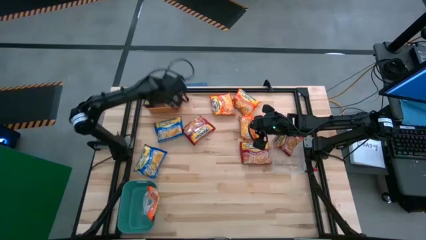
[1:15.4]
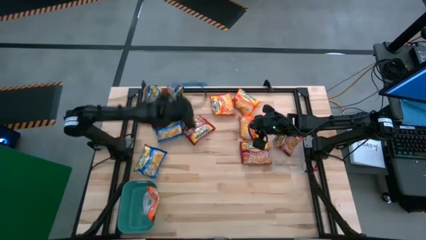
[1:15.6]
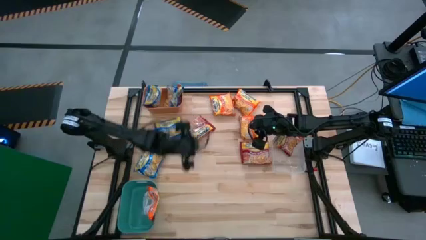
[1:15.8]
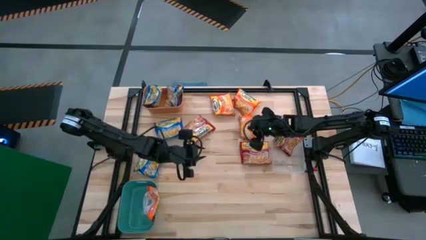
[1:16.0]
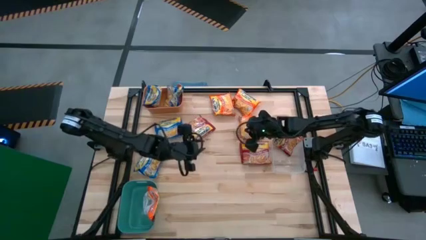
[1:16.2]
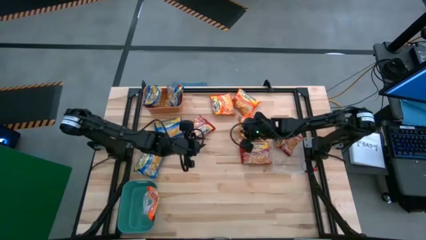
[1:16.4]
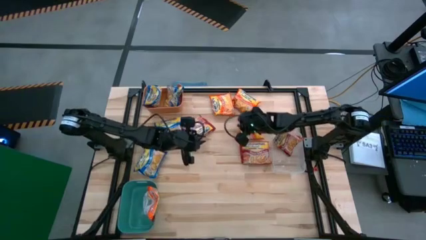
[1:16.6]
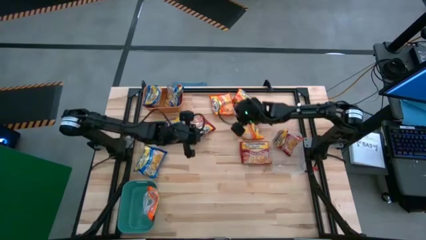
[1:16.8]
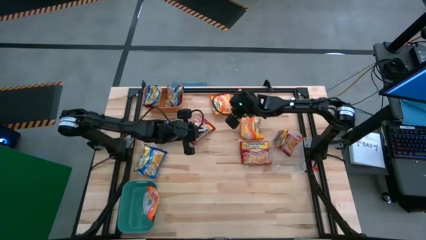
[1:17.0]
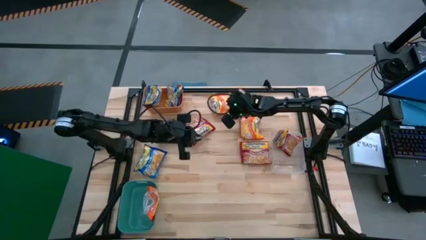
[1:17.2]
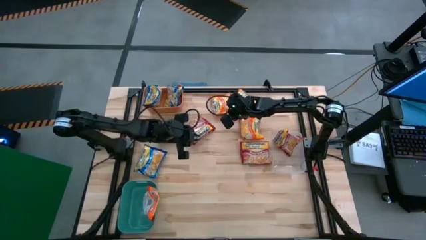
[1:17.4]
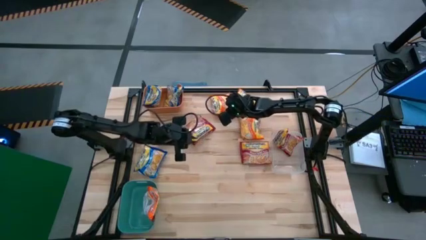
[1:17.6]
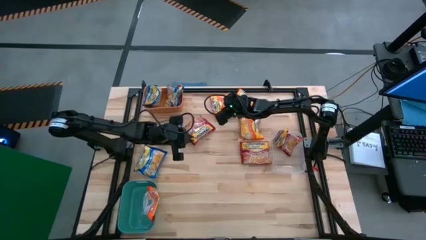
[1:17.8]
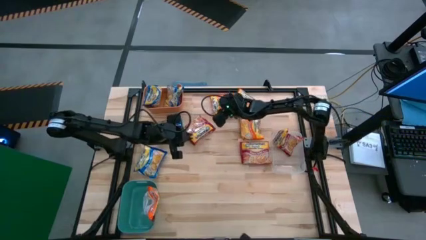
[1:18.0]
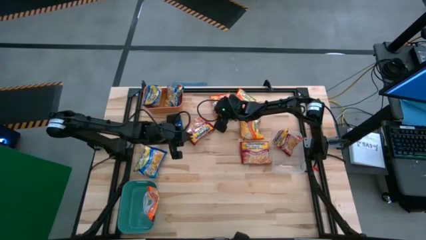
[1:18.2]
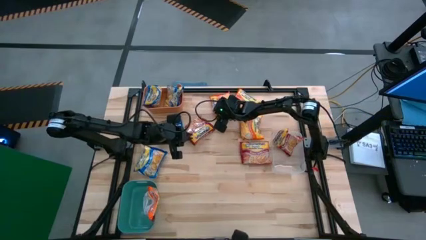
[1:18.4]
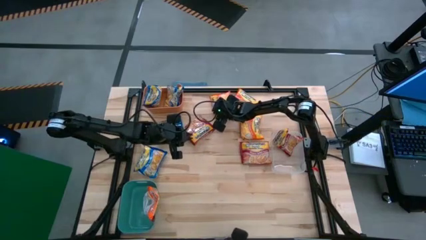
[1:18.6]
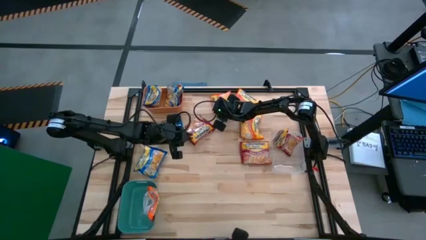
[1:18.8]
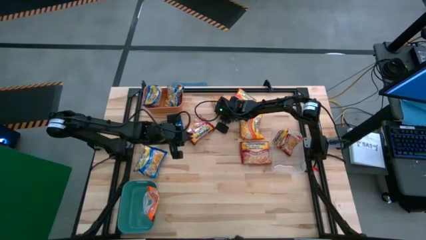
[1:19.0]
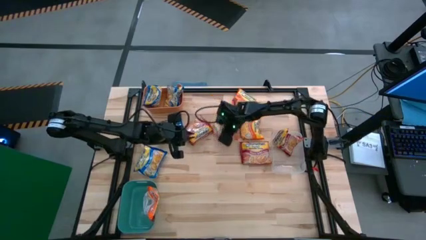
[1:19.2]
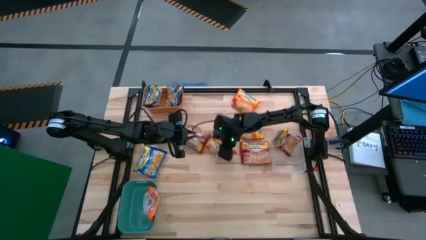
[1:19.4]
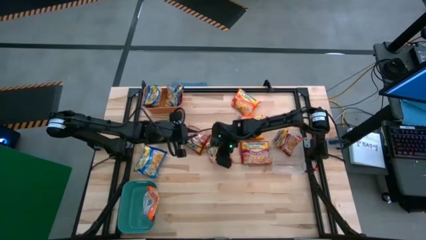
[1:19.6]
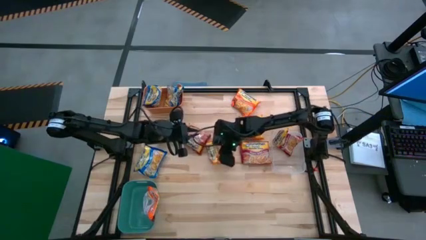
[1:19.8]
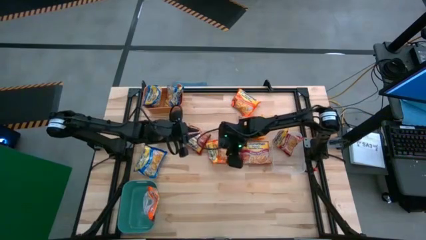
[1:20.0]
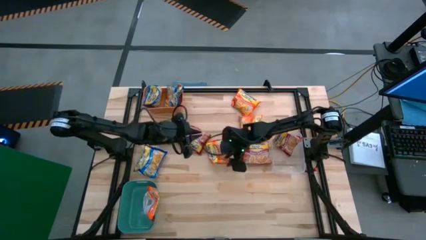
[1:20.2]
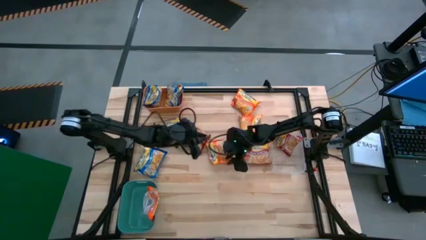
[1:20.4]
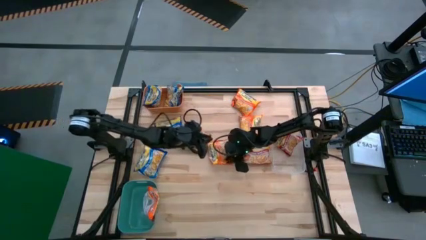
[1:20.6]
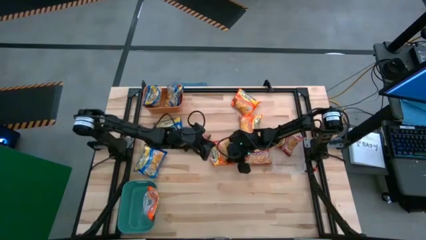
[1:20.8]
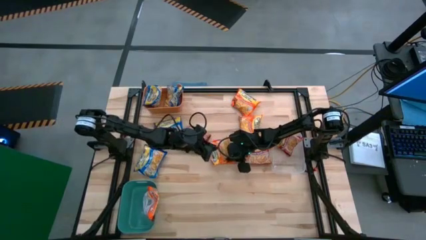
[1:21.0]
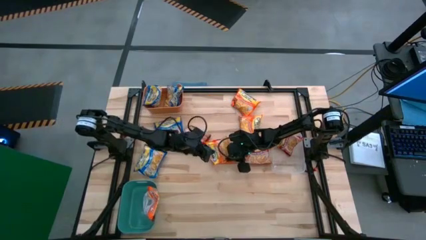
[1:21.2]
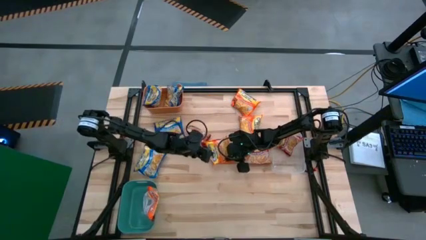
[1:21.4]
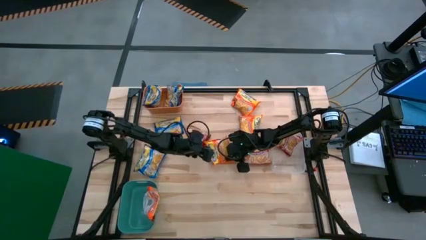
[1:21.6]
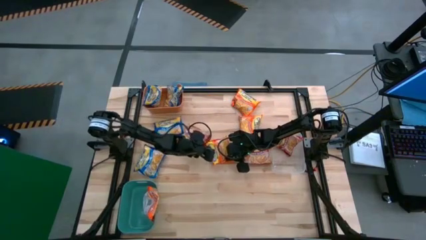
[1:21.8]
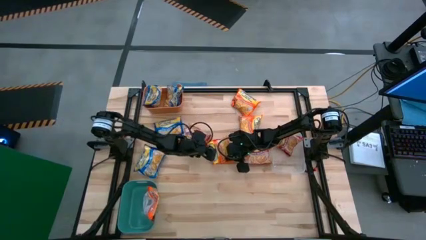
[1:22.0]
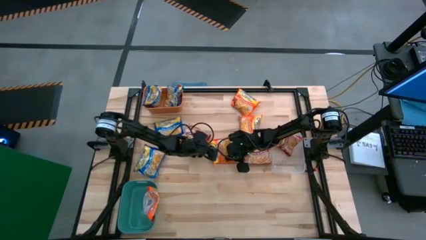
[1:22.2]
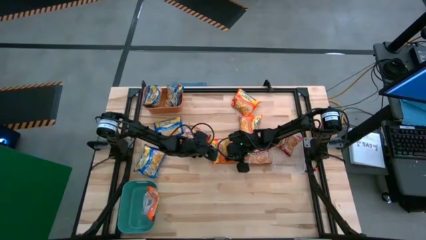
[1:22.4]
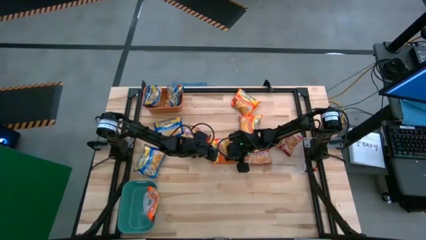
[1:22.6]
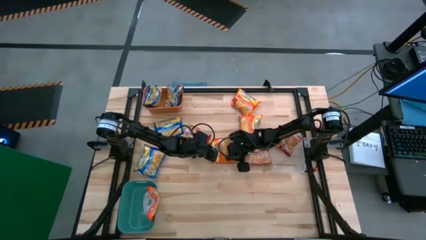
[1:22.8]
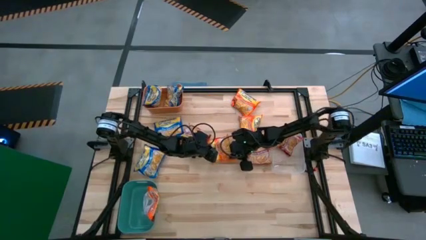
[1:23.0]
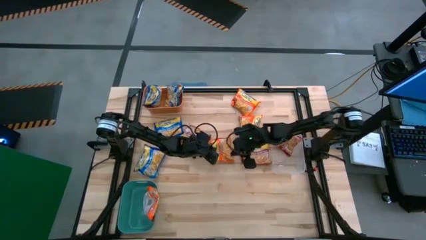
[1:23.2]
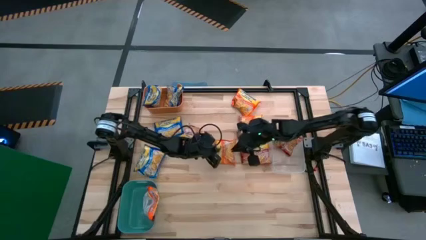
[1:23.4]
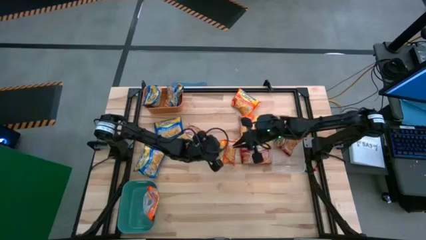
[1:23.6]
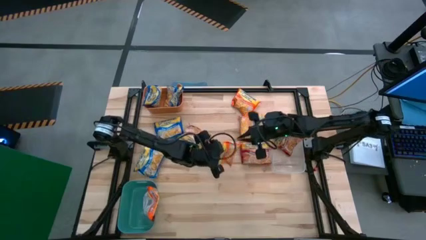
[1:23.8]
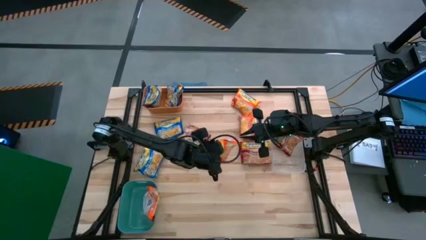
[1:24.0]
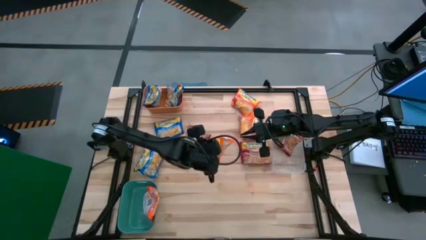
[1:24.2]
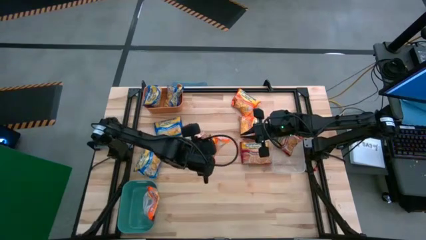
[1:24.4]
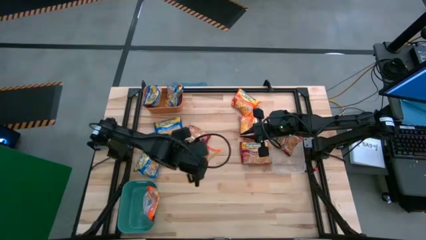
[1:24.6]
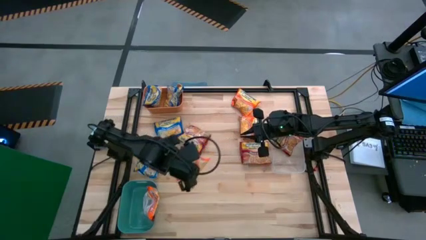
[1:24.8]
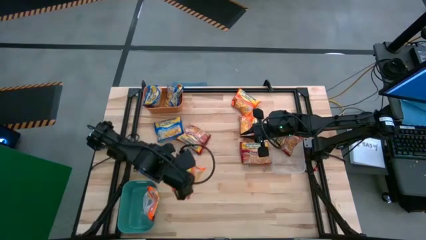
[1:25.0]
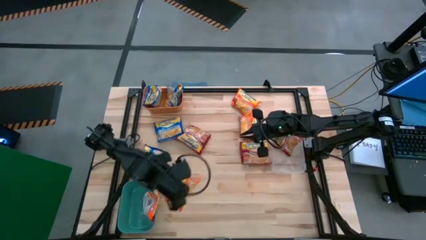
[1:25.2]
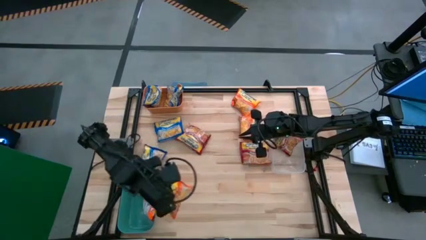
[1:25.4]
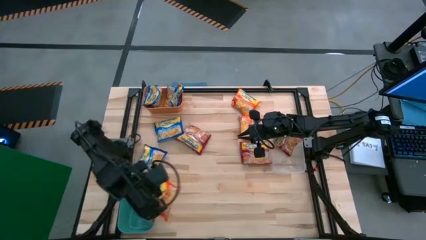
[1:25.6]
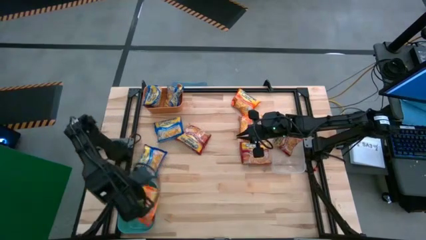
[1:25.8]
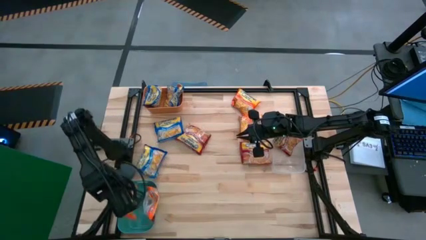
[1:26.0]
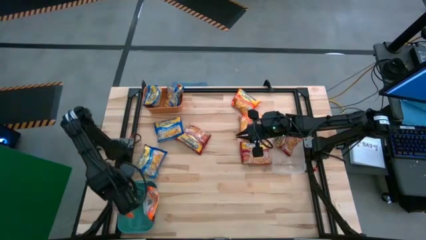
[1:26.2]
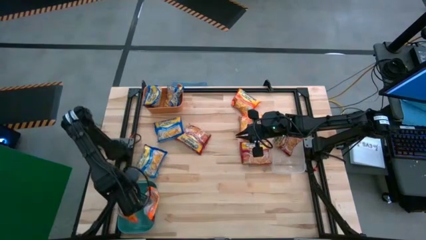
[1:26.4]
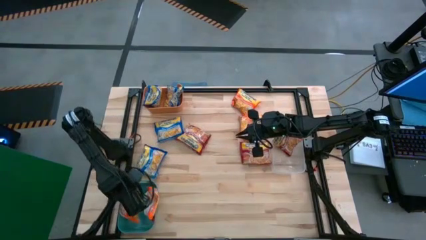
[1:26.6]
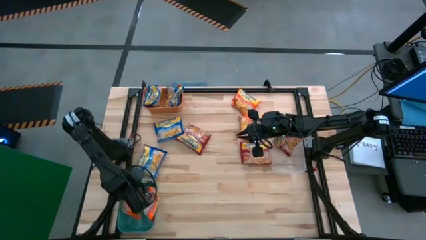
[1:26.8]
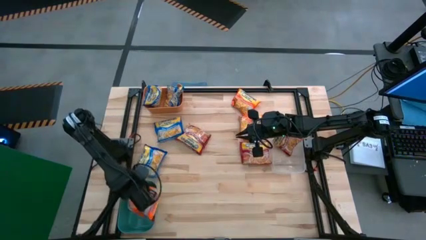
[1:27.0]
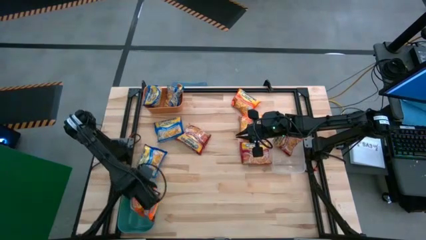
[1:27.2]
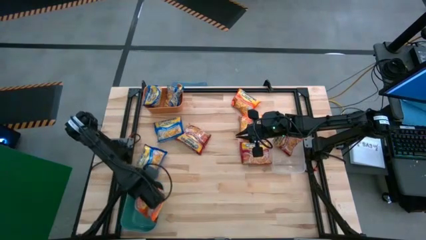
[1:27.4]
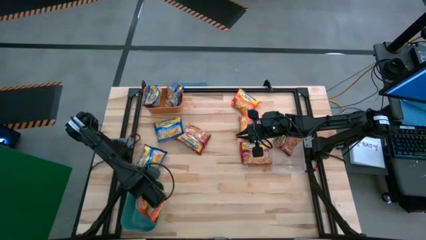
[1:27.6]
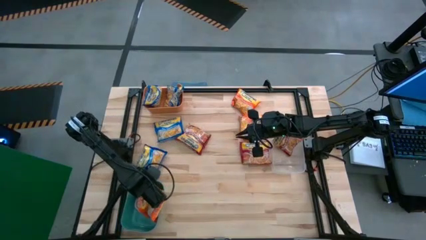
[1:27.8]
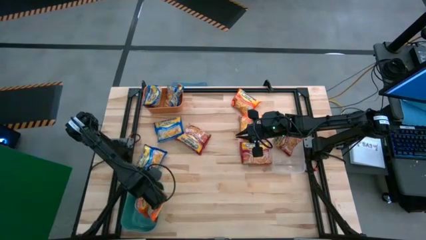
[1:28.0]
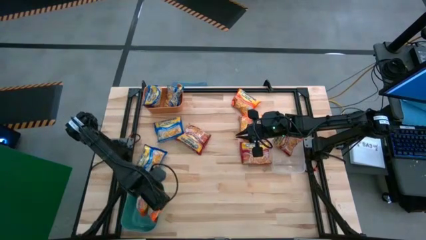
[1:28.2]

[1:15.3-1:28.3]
Task: Sort Maruchan noodles
Put the orange noodle pack into the green bin

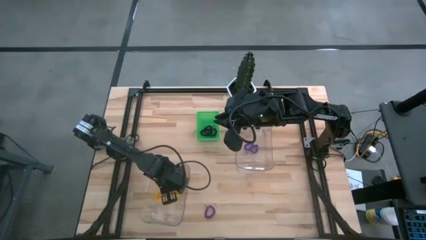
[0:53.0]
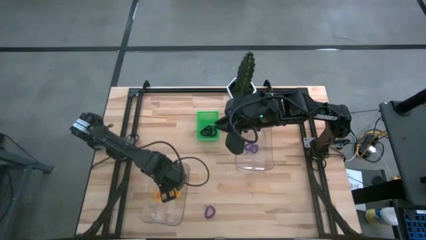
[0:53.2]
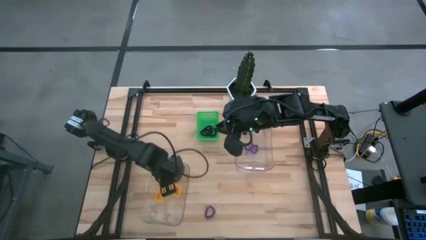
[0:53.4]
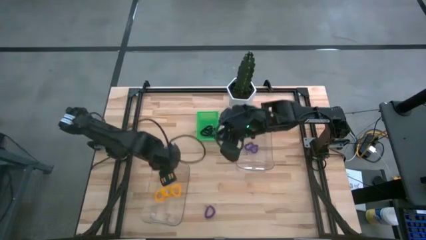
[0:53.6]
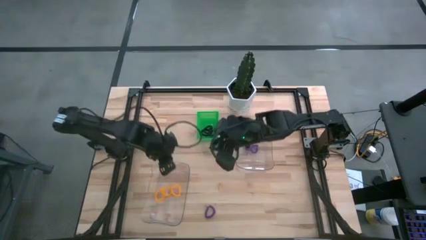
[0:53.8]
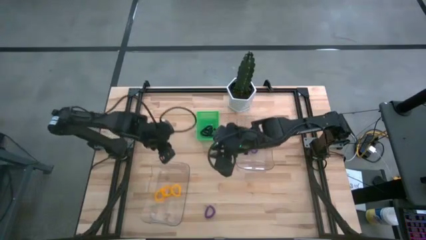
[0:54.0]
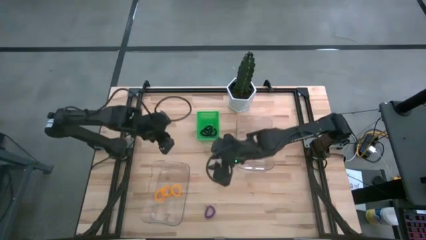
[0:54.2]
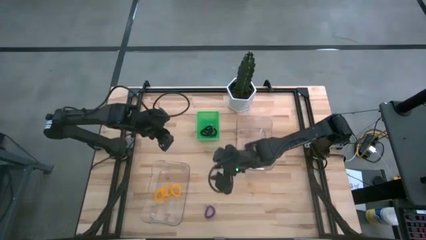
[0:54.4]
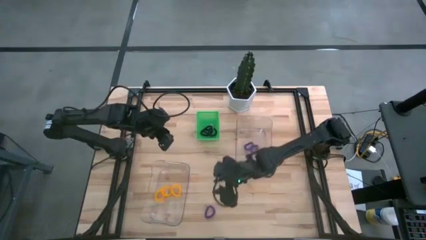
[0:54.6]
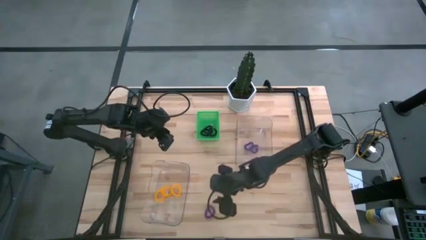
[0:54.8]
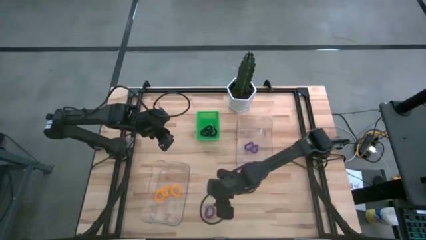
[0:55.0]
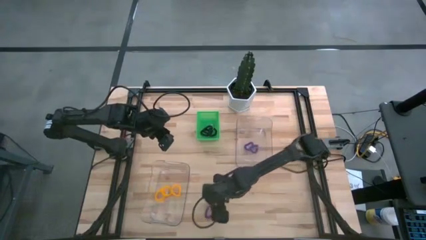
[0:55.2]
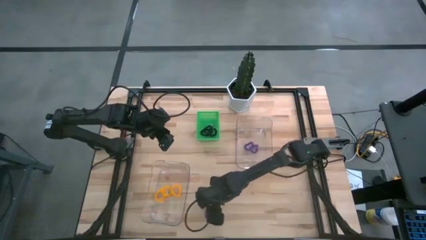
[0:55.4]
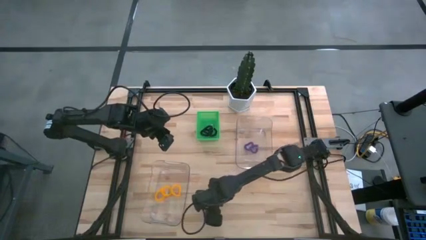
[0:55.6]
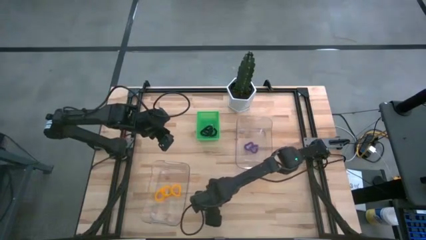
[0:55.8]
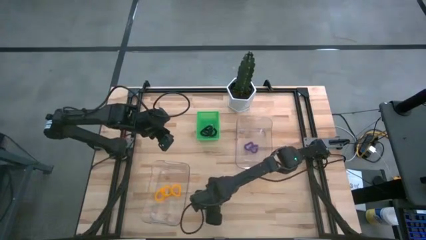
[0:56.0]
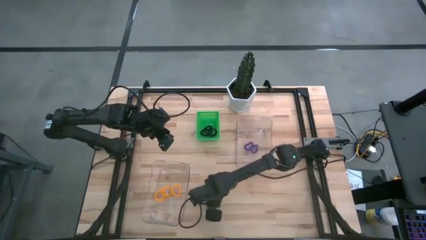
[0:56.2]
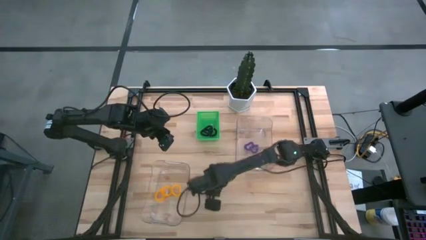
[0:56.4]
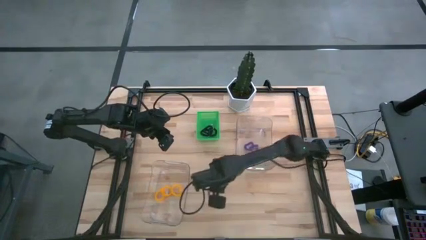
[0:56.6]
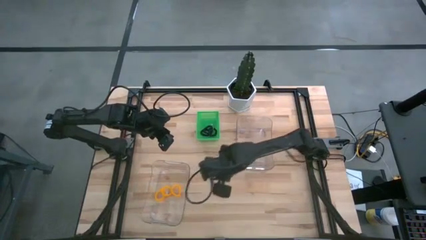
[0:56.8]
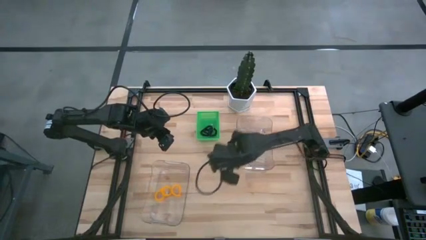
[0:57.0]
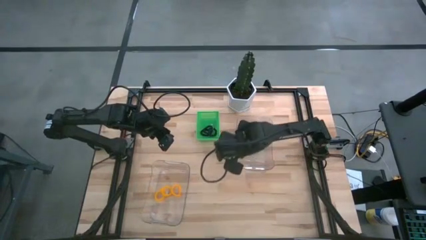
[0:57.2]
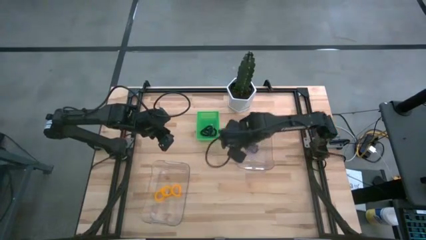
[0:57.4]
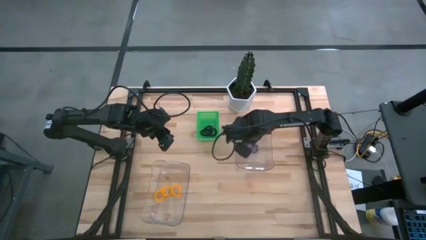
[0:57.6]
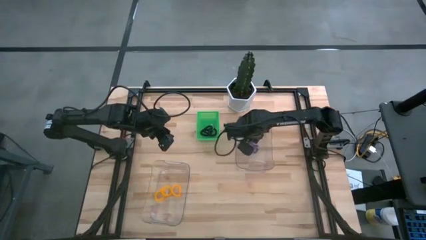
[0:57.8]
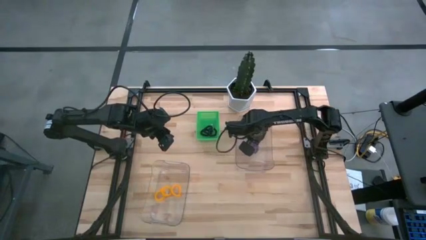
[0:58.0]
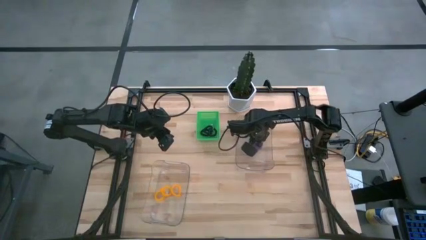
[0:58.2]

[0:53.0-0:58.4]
Task: Sort spring keychains
Put the purple spring keychain into the top transparent bin
